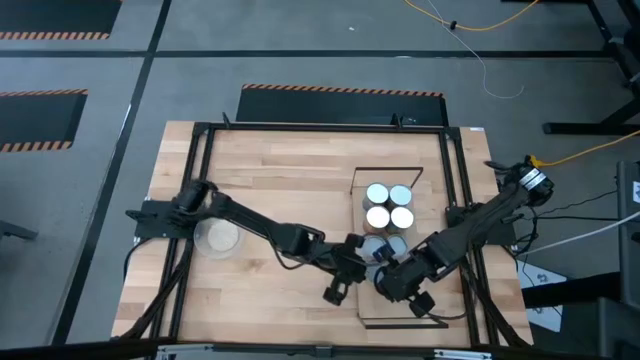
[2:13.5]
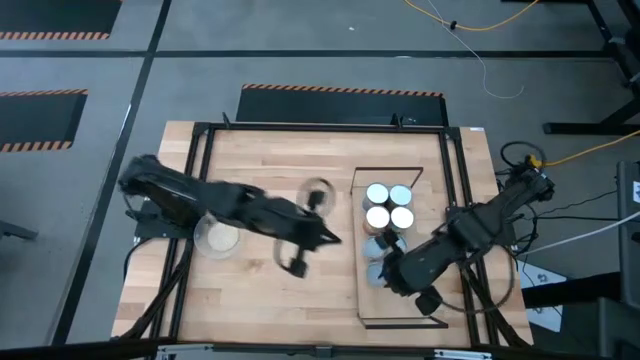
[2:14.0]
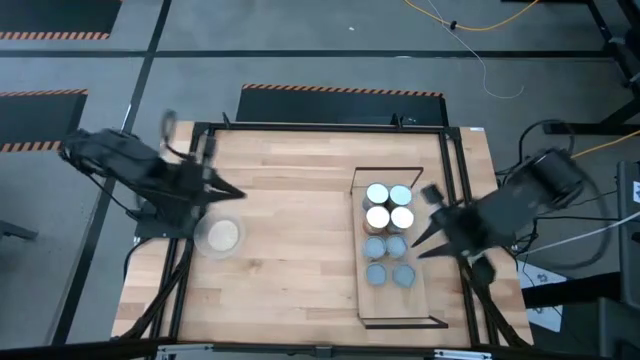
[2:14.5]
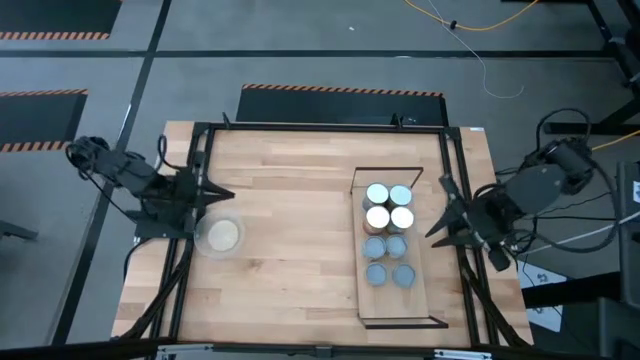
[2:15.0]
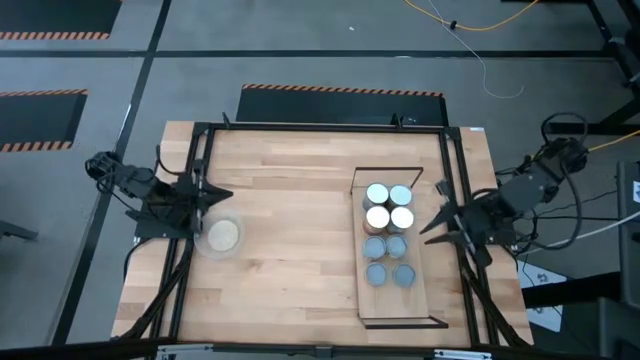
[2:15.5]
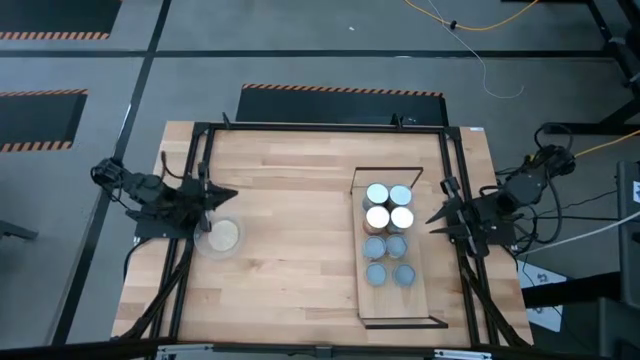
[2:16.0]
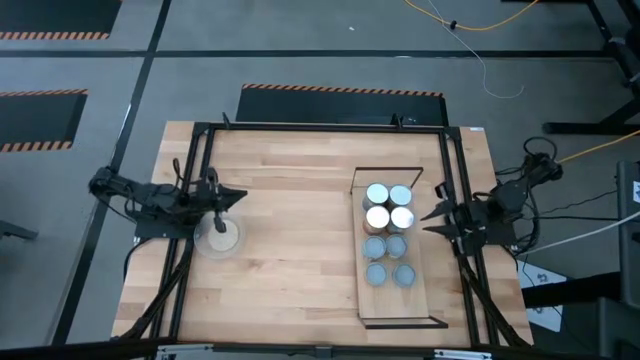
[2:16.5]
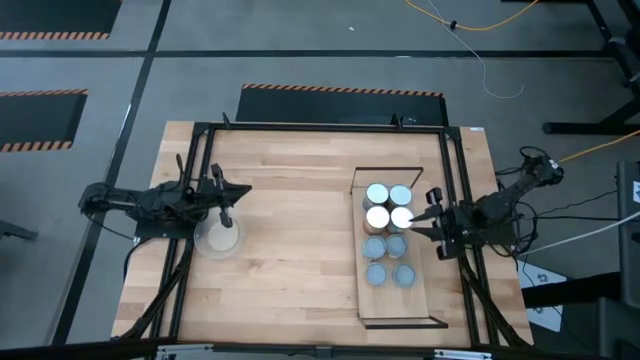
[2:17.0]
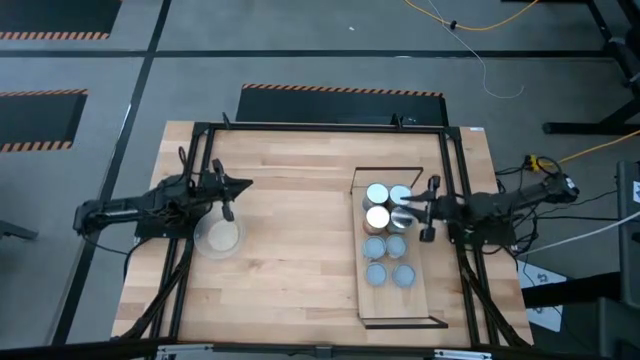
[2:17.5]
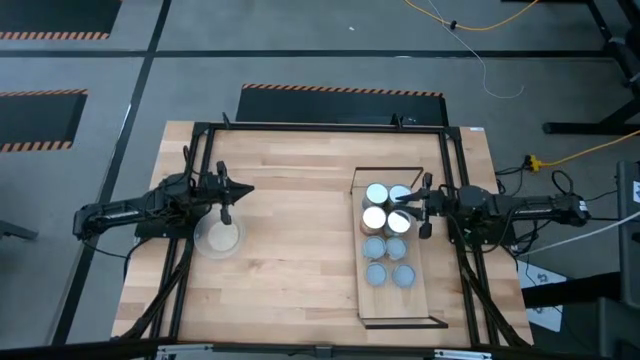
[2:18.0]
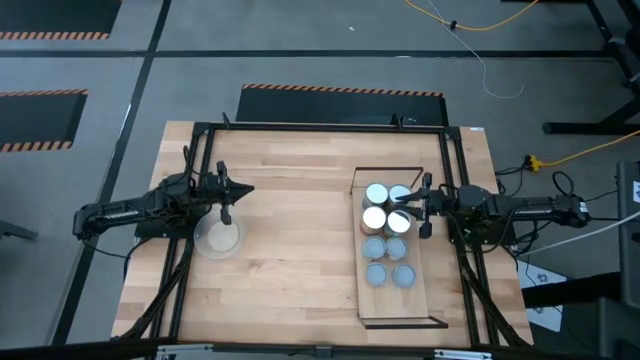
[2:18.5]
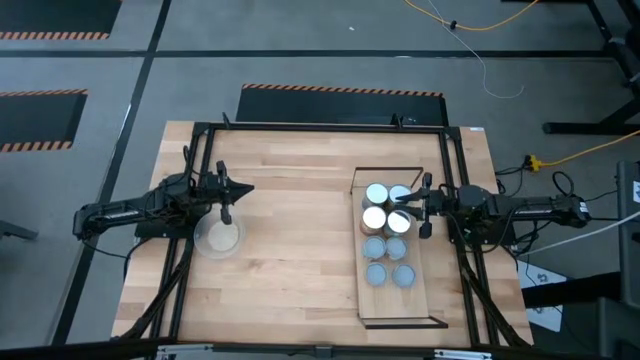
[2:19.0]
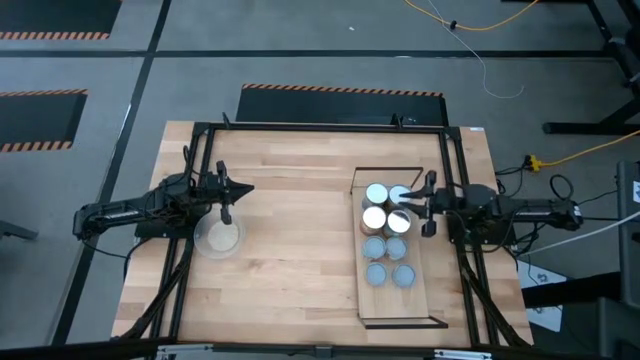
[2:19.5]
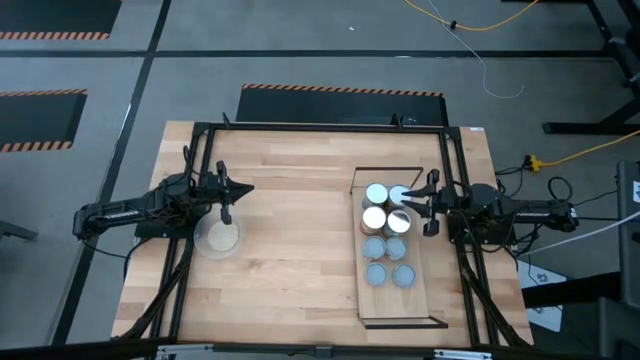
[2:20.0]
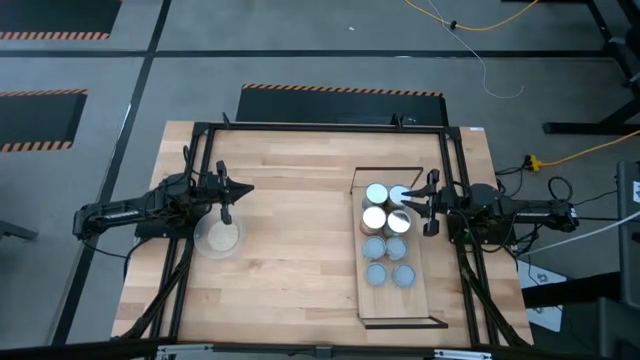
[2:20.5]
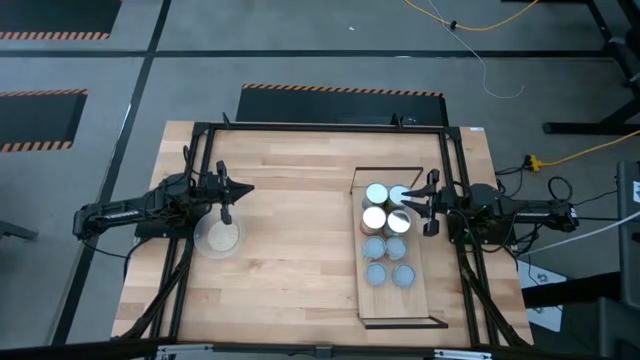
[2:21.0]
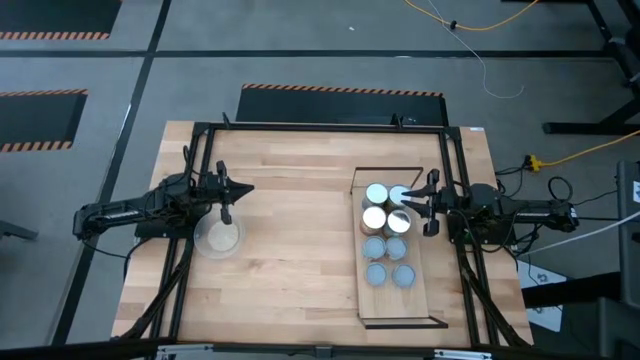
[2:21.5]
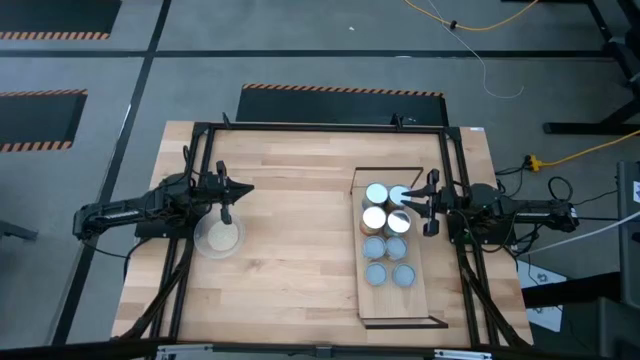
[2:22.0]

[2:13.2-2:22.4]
Task: Pick and place cans onto a shelf
Return to Home Position

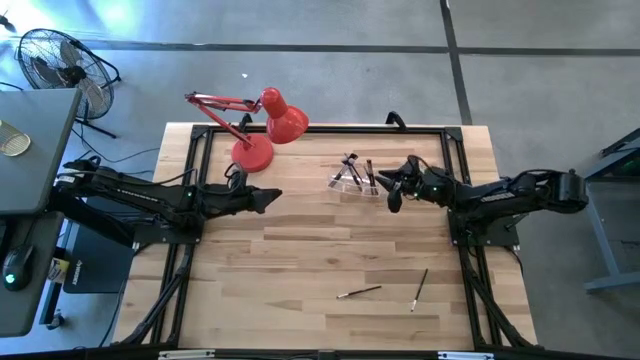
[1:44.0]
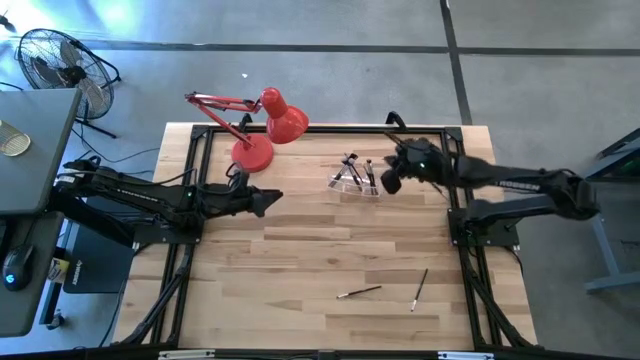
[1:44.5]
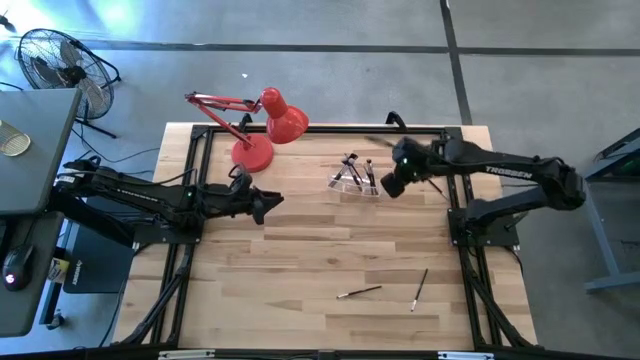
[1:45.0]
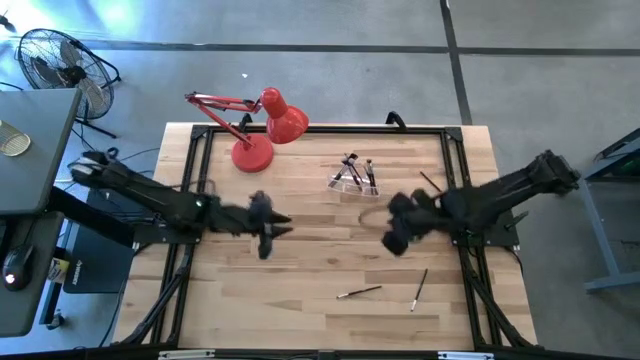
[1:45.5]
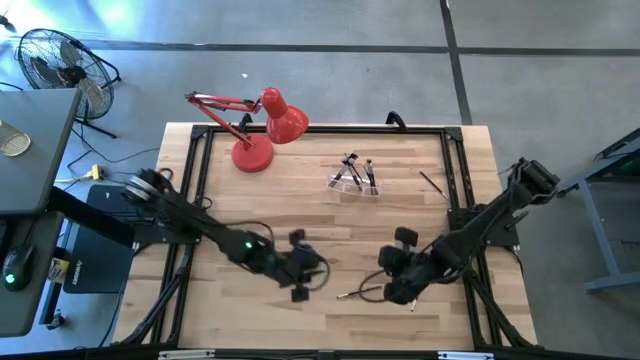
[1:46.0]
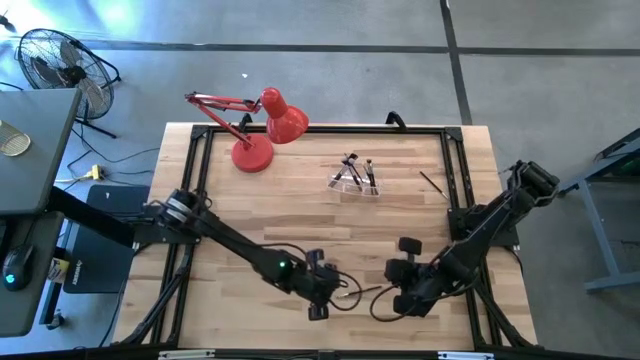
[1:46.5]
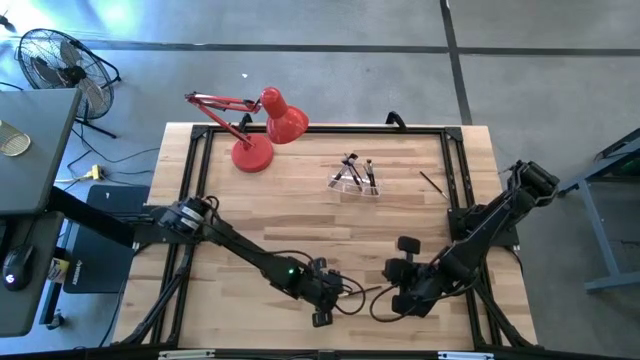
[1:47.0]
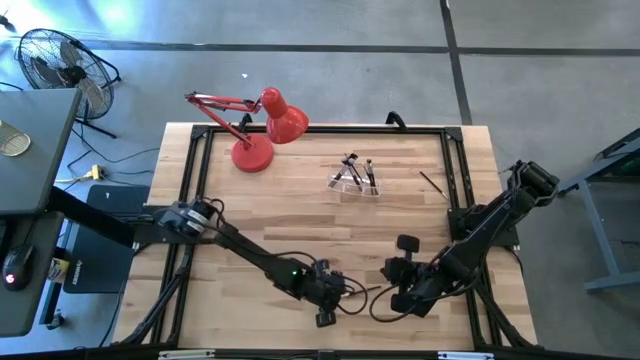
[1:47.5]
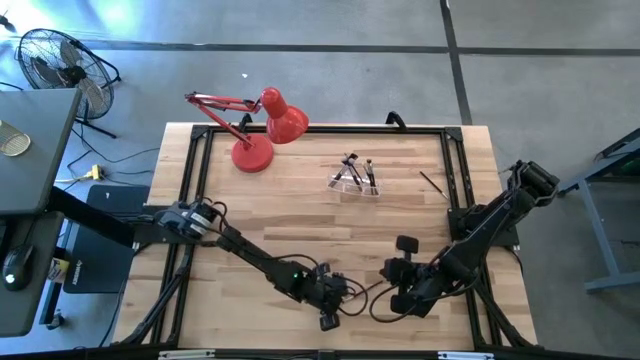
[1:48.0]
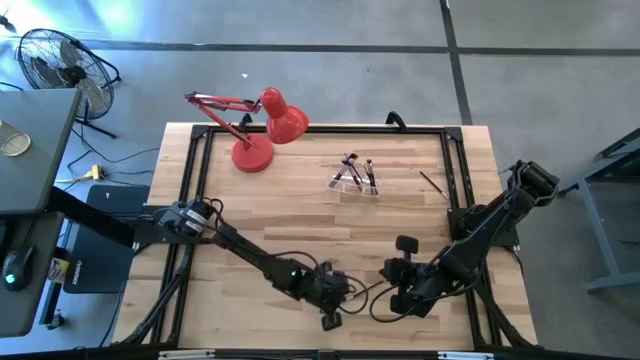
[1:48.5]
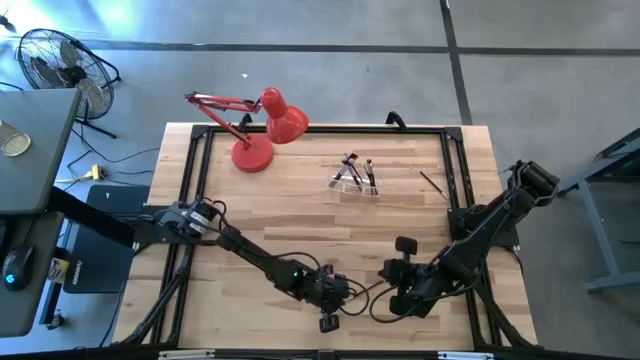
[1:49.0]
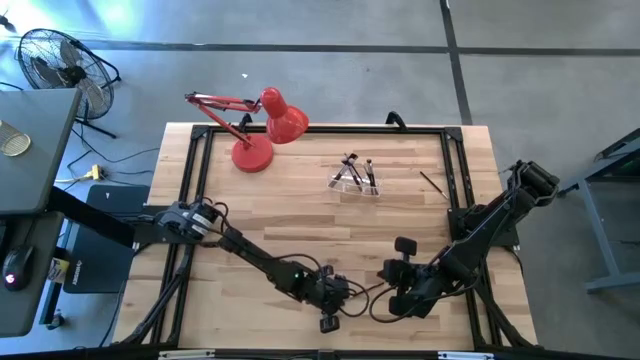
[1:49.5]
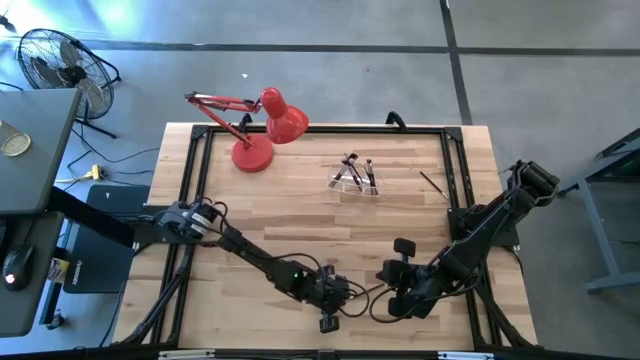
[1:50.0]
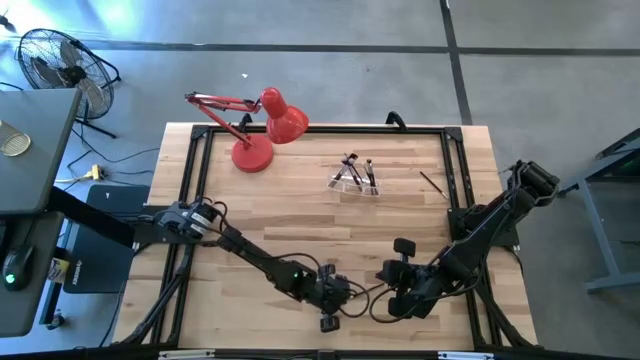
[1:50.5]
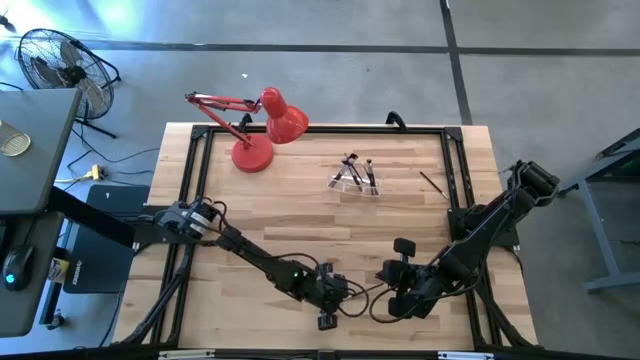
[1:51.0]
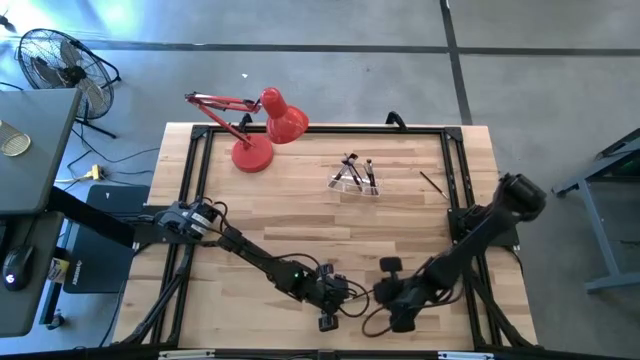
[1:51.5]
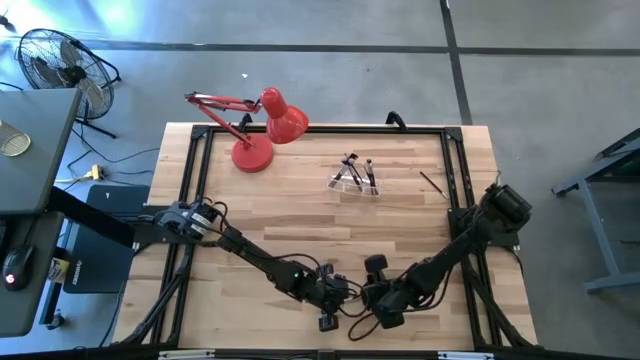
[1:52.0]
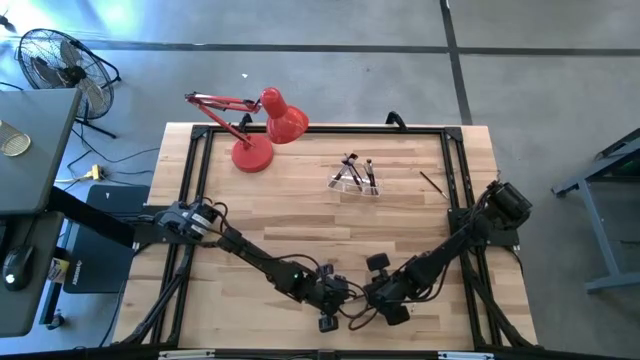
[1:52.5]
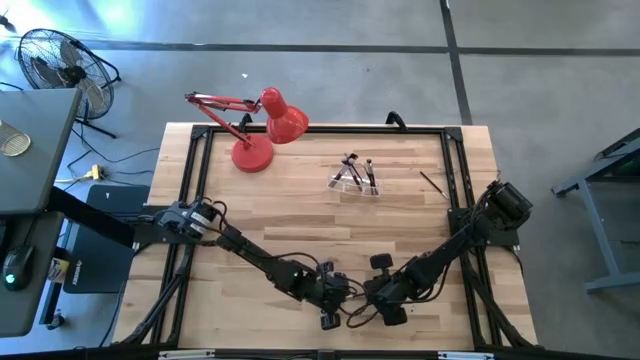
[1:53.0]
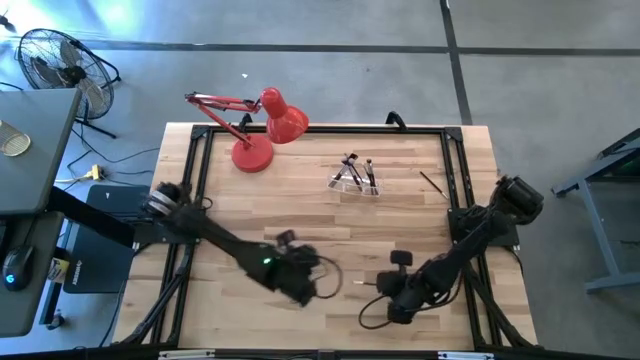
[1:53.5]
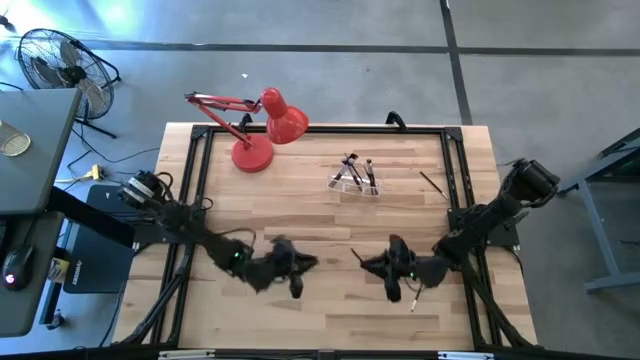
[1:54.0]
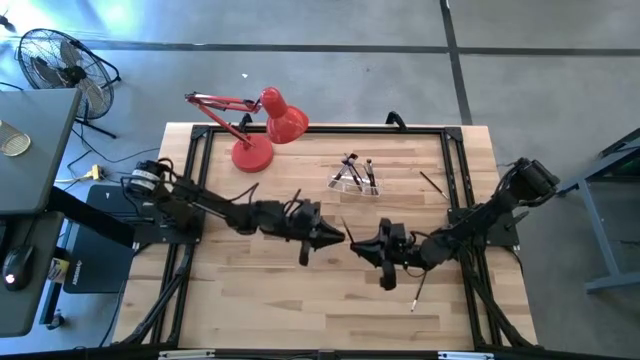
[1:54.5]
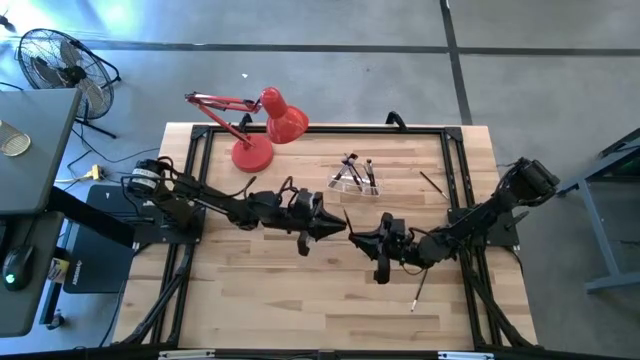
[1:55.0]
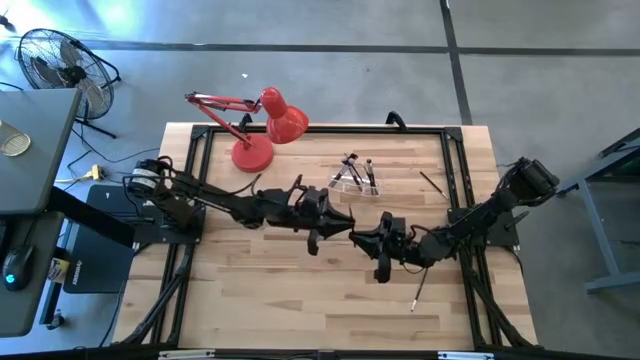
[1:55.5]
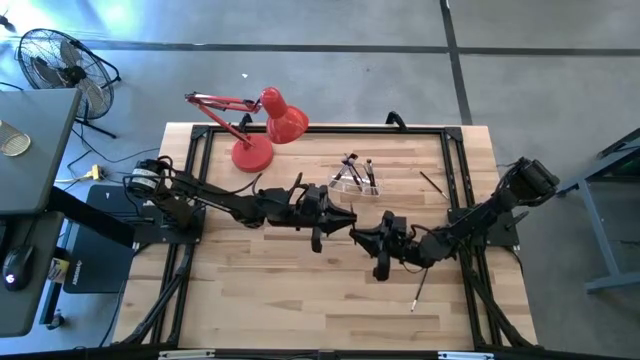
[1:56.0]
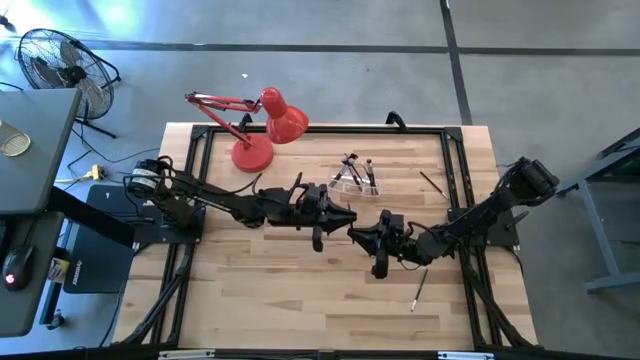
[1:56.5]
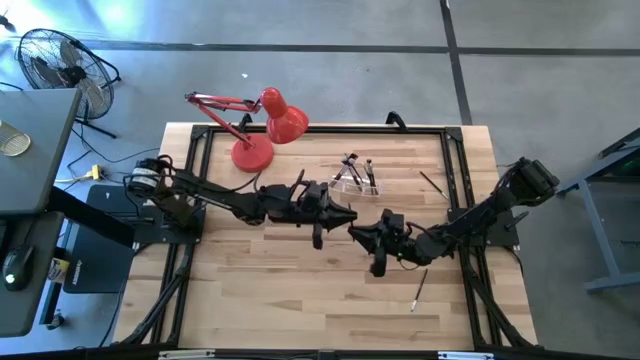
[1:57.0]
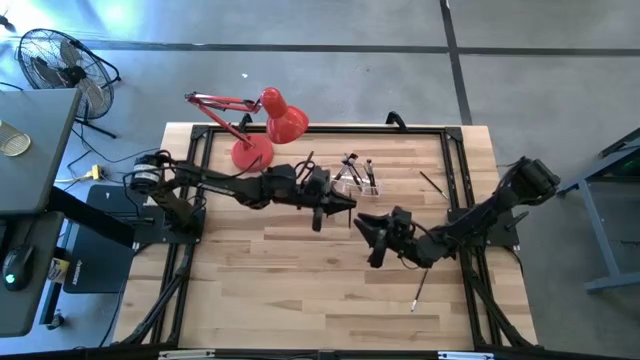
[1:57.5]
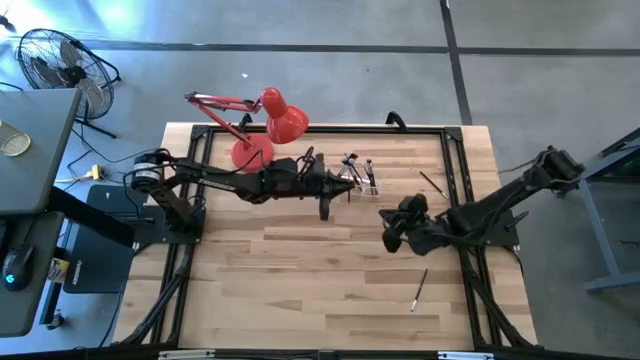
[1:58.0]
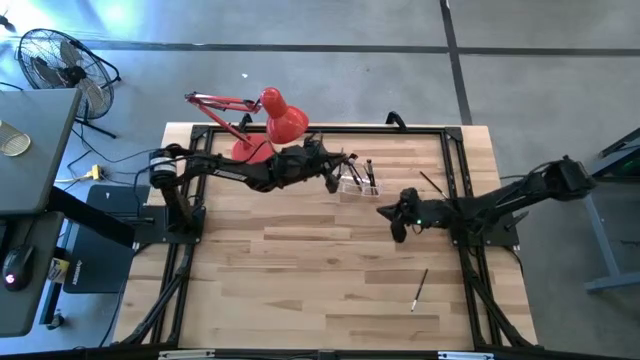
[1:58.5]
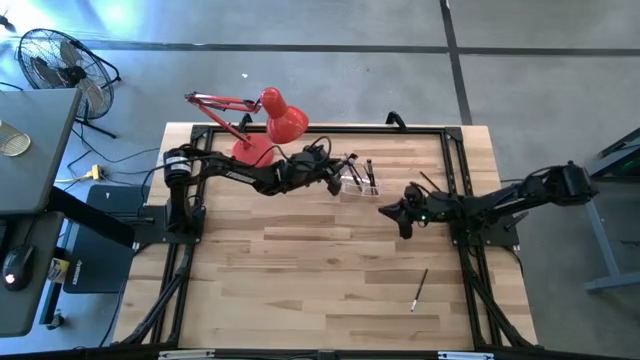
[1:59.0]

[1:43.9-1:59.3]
Task: Put items in baskets/containers
Put the eyeshadow brush into the transparent organizer
